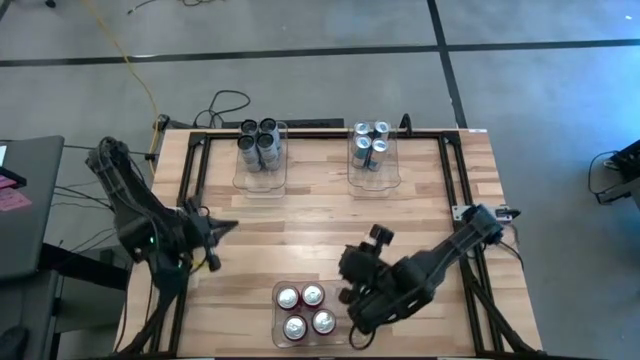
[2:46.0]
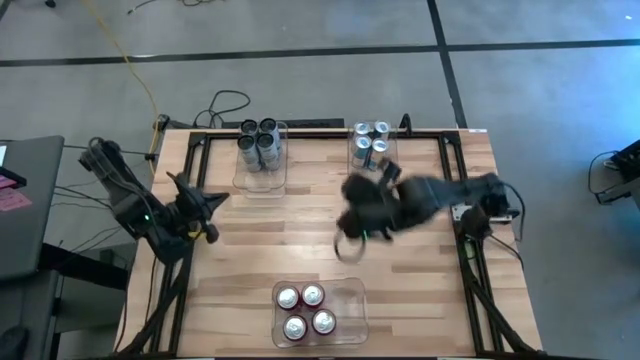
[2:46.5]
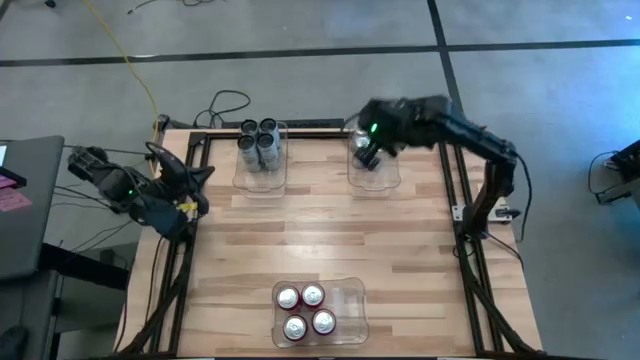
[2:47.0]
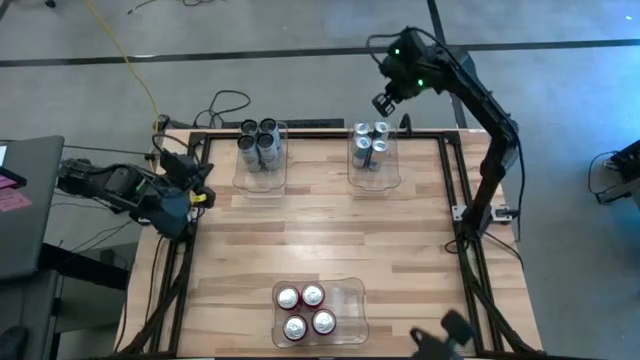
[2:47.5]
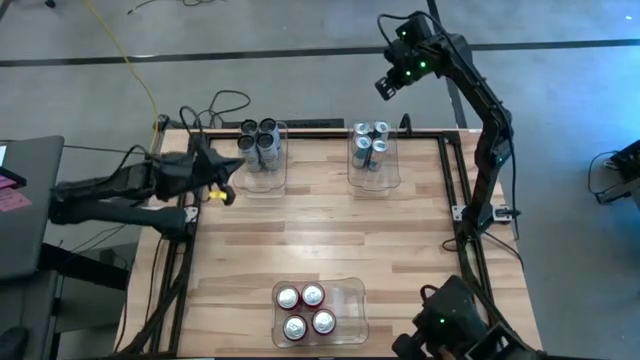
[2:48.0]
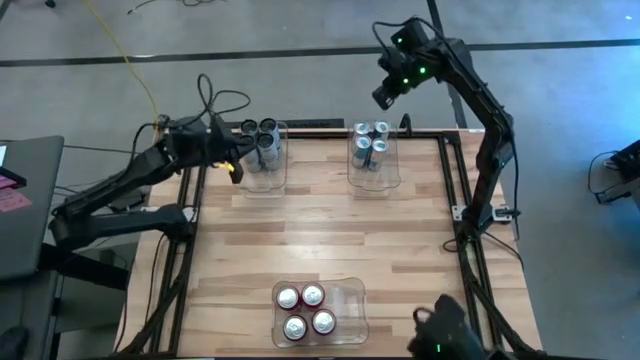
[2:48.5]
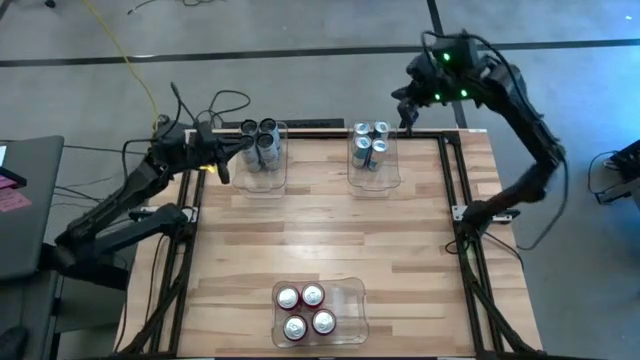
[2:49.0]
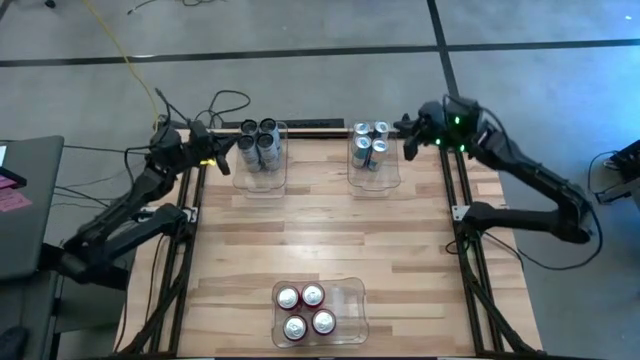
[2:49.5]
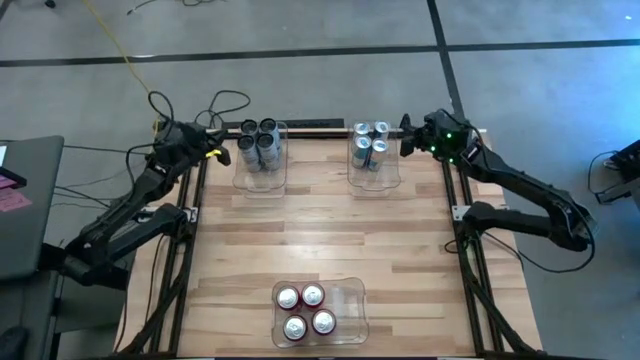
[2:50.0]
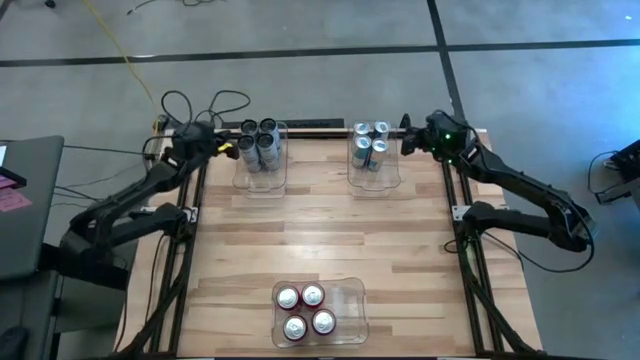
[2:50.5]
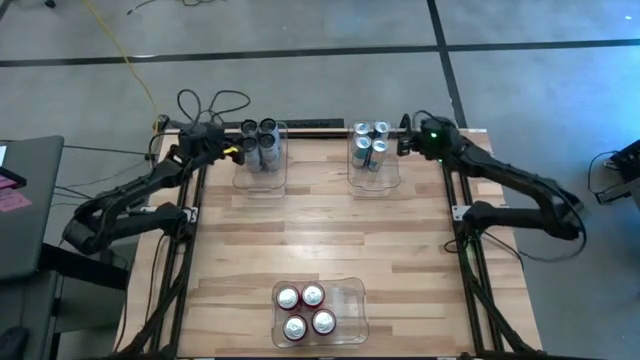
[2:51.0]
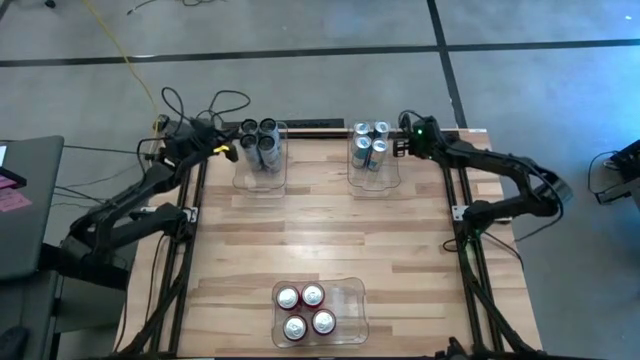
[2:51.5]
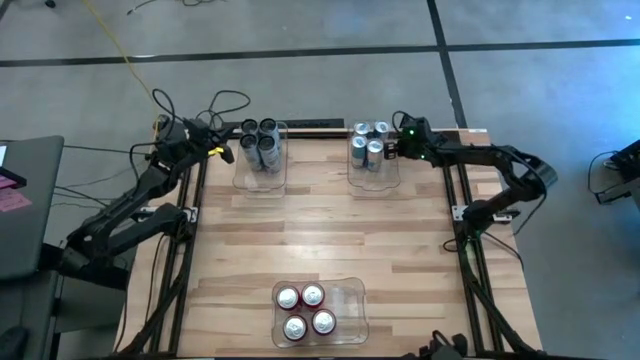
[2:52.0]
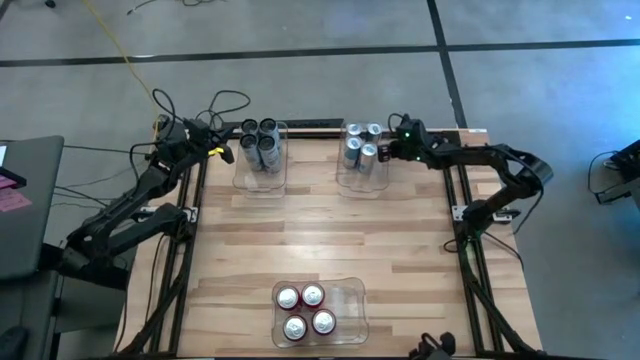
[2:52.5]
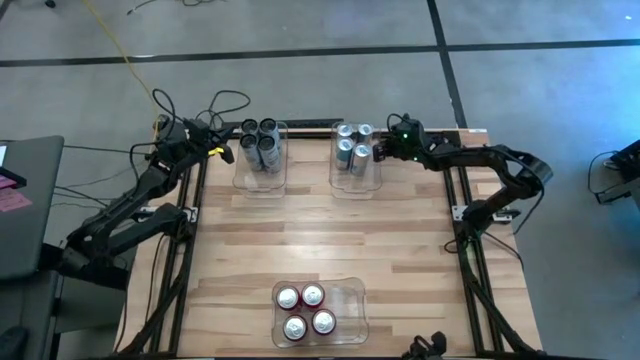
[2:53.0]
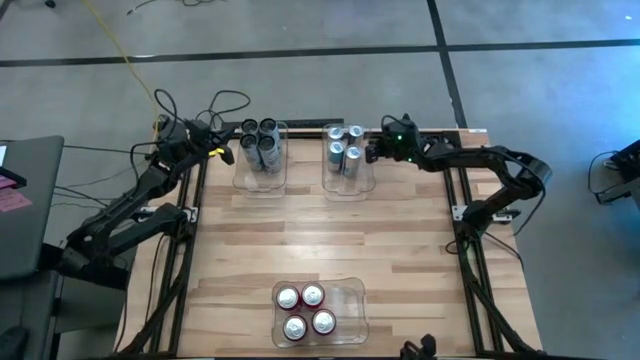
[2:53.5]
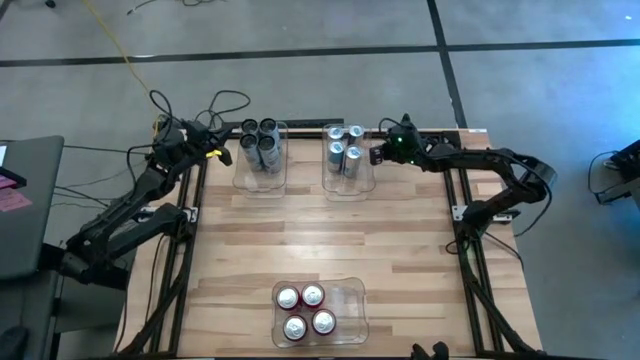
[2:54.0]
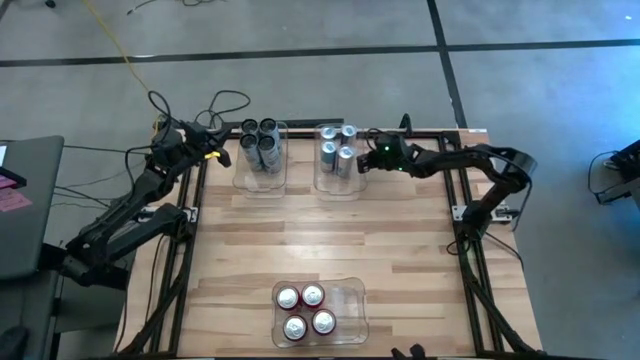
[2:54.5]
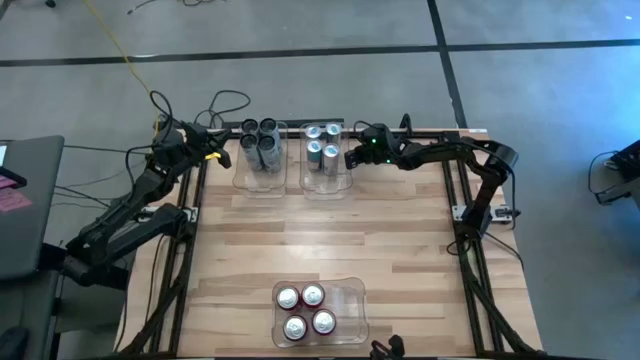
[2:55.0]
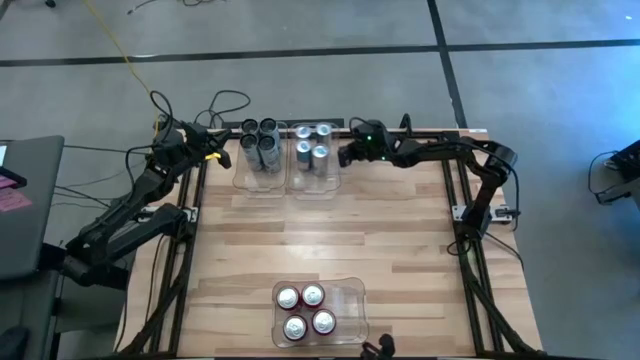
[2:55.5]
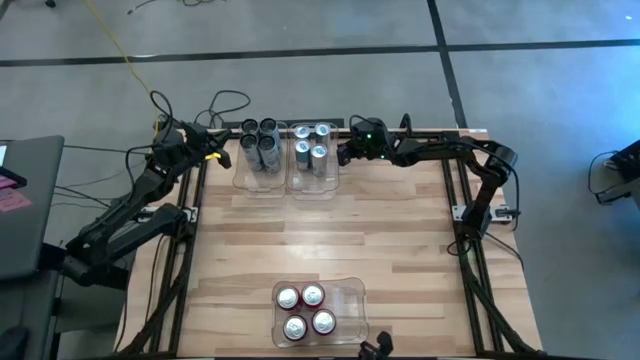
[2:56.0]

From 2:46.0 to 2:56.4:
Task: Sort soda cans
Move the top right transparent bin to the top center

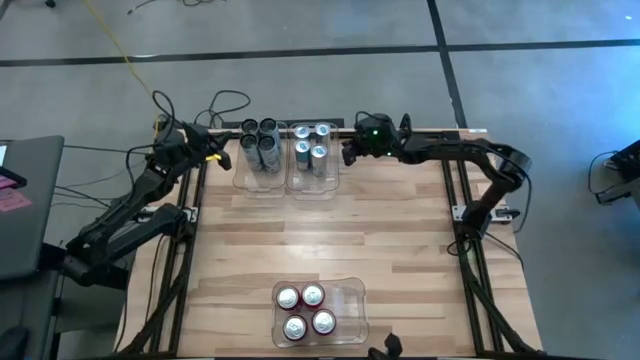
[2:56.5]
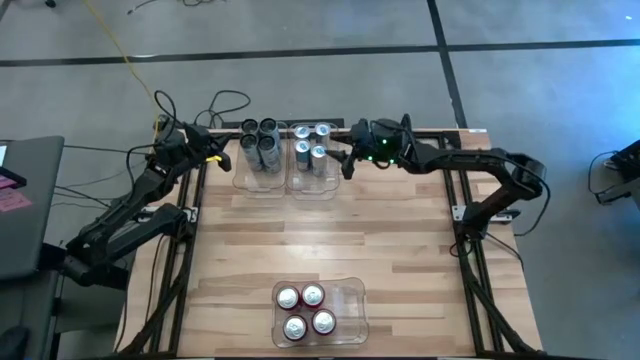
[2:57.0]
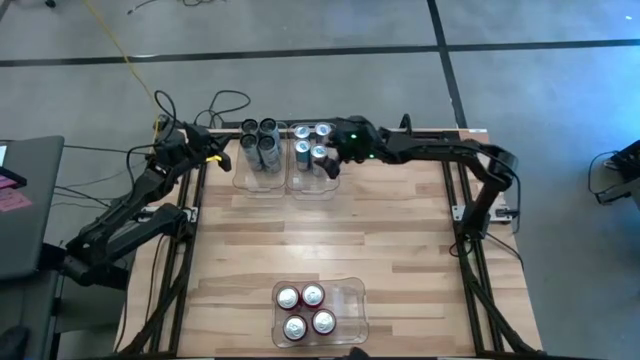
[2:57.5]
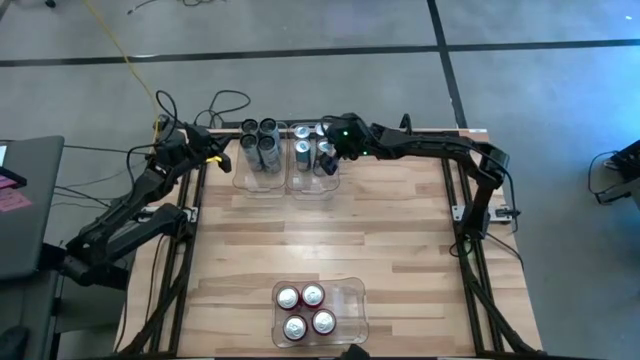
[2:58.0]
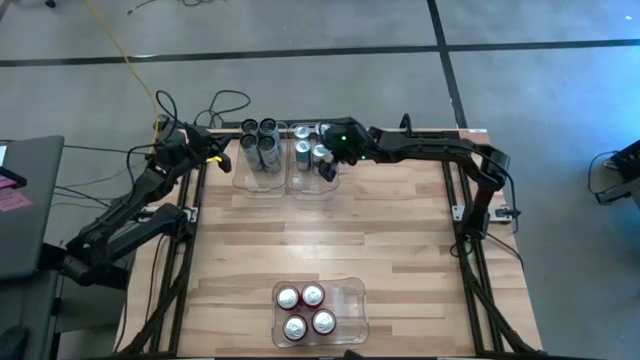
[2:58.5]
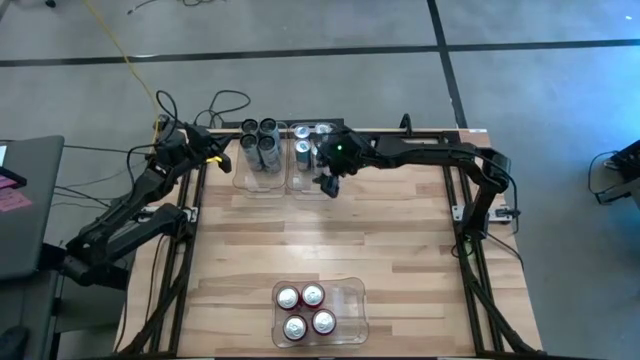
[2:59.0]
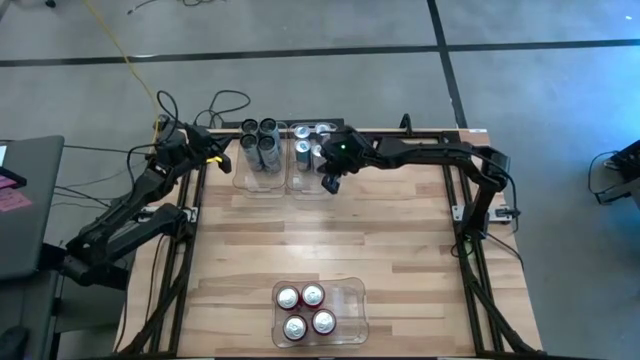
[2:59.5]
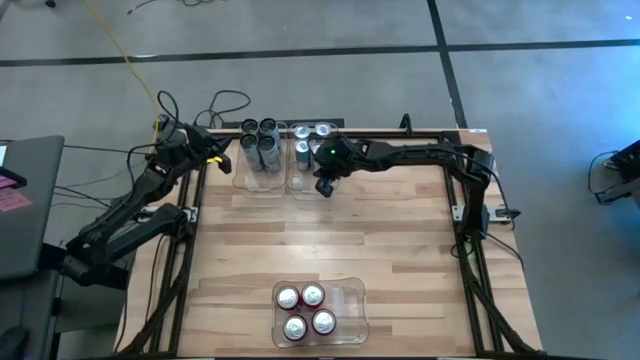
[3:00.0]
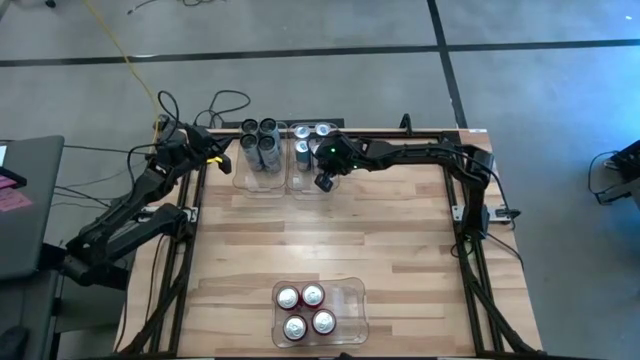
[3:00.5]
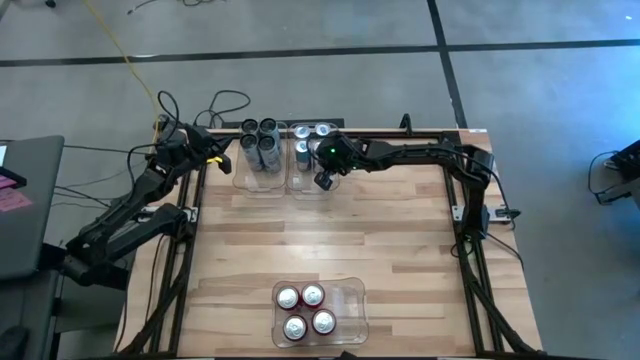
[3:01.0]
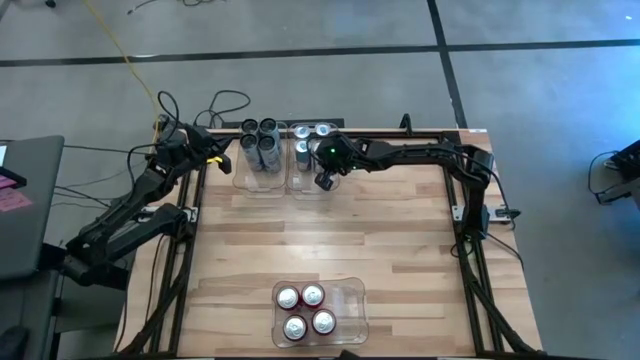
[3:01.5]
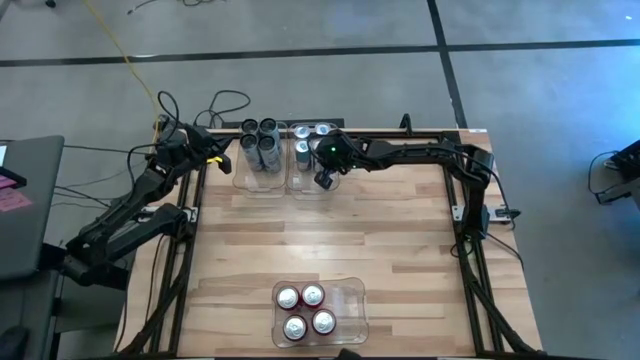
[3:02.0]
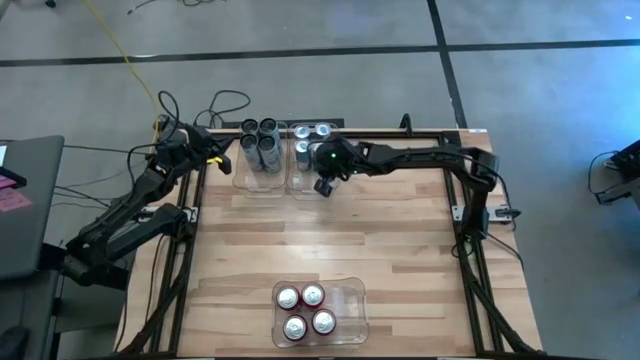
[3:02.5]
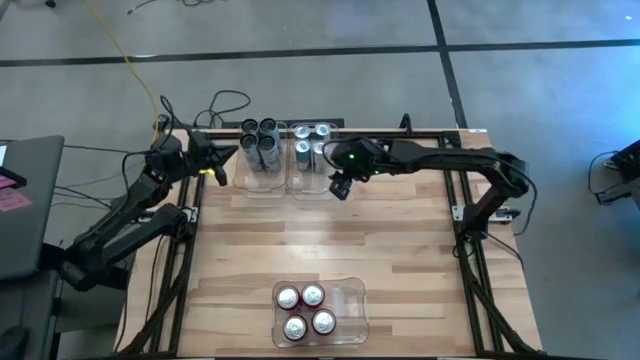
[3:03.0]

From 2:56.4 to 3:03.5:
Adjust the blue soda can in the bottom transparent bin

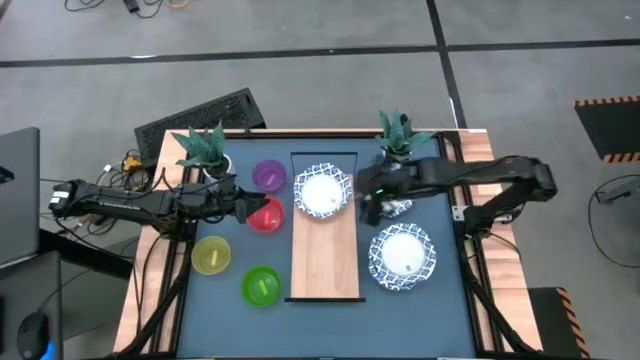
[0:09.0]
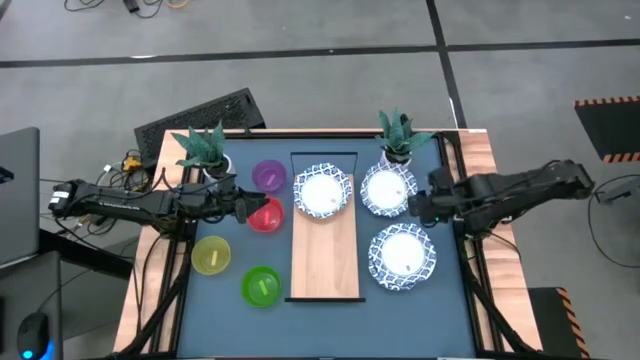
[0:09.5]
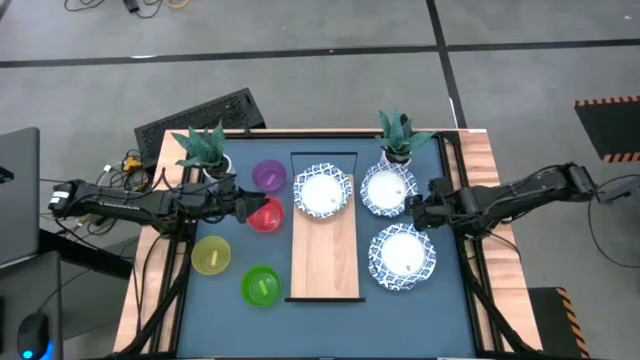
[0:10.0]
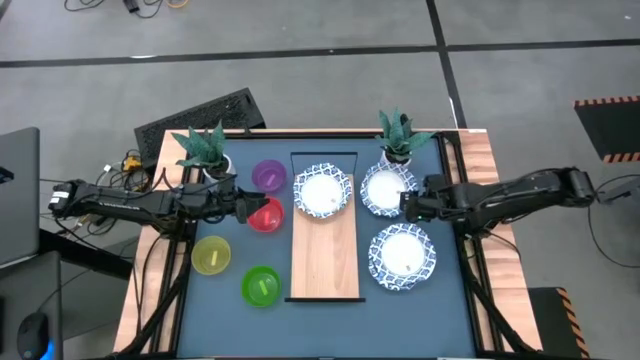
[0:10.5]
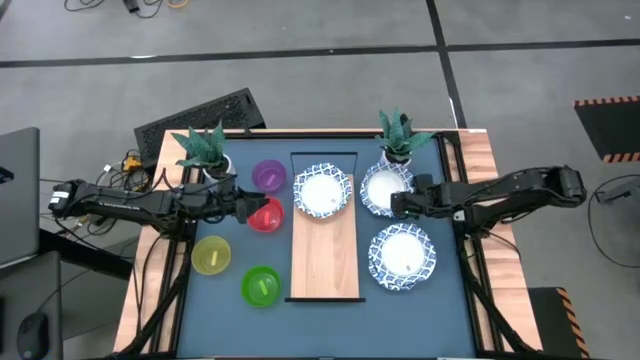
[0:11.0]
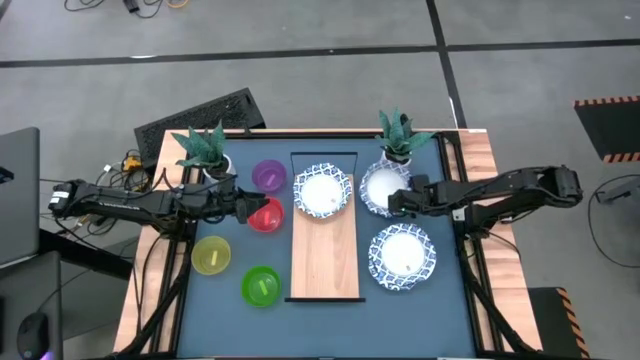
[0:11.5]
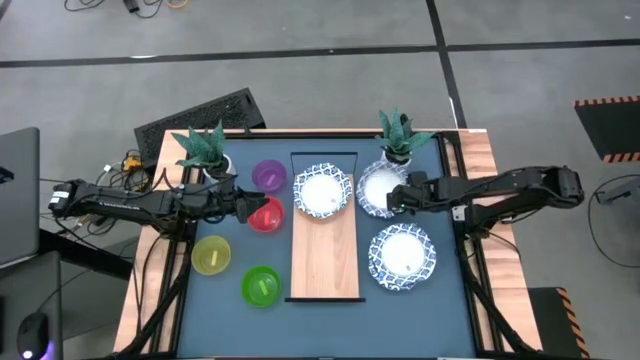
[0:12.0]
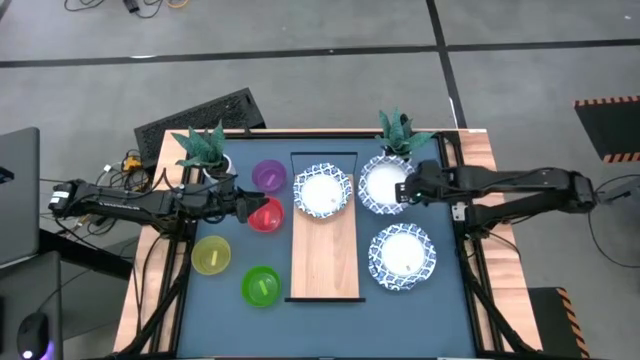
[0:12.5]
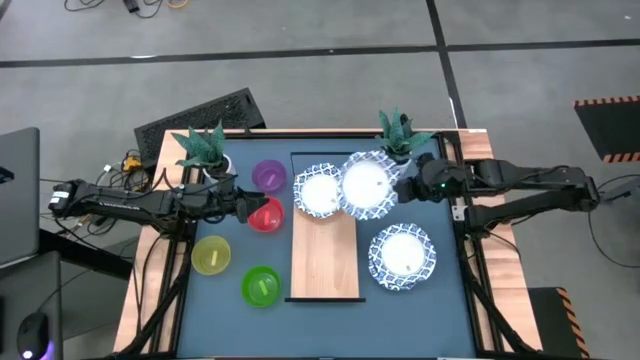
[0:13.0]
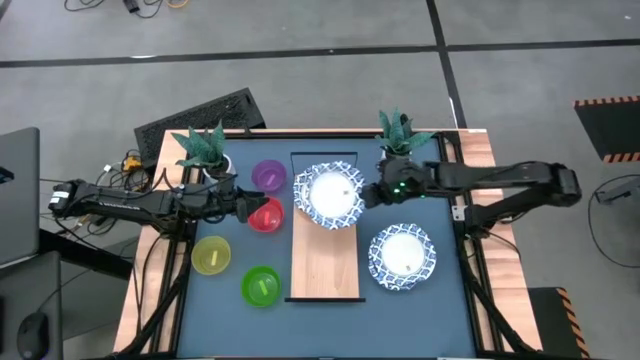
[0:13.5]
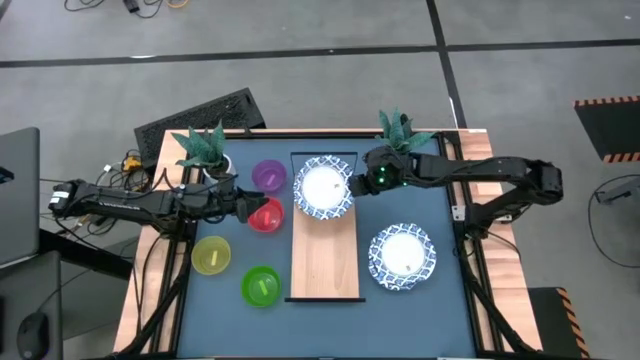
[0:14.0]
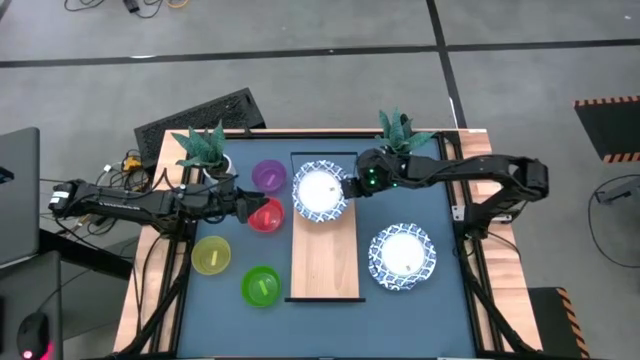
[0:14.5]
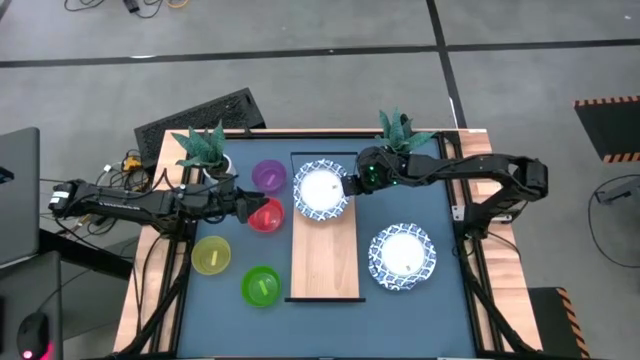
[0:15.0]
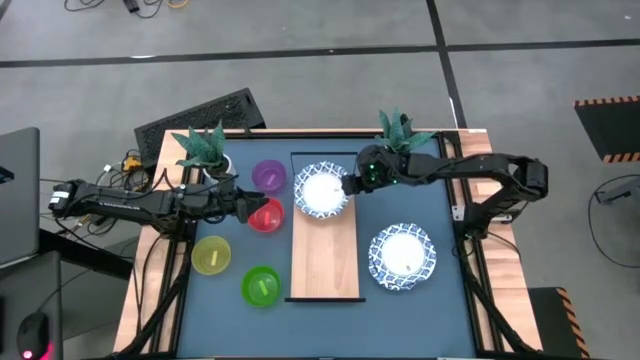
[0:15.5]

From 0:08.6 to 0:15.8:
Task: Place and stack bowls onto a shelf
Stack the white patterned bowl on top of the white patterned bowl on the shelf
